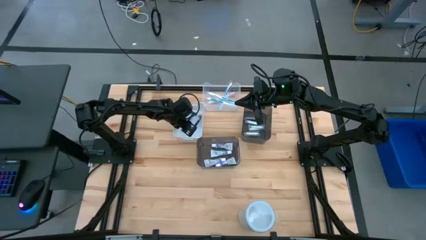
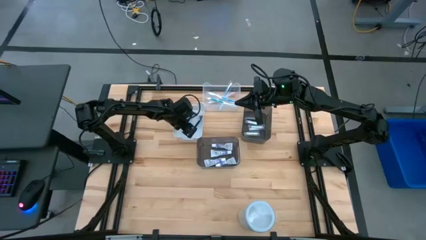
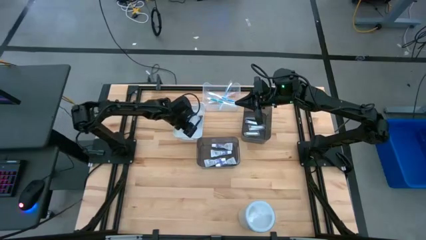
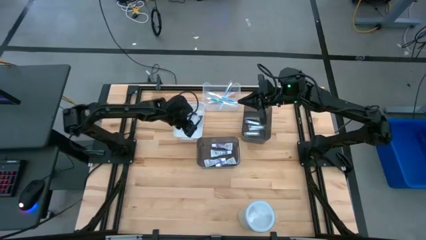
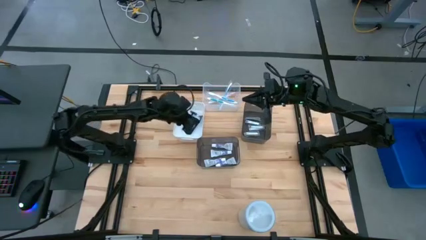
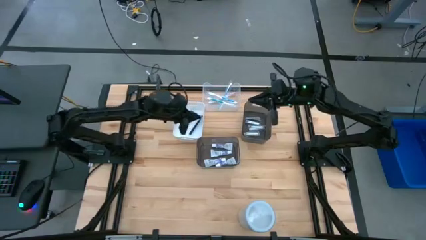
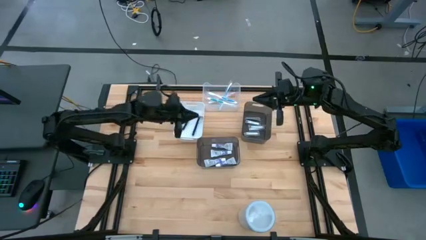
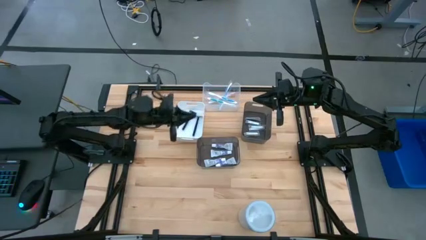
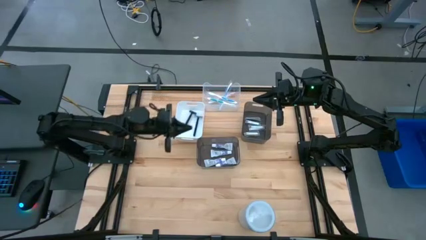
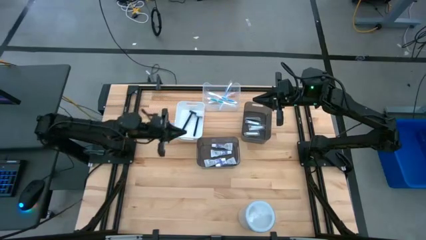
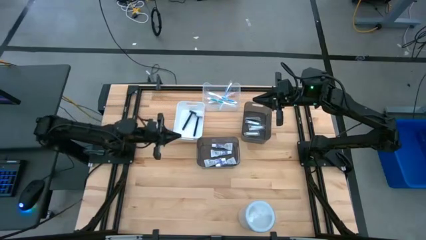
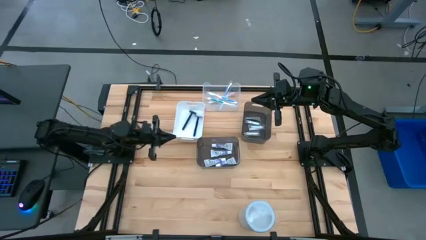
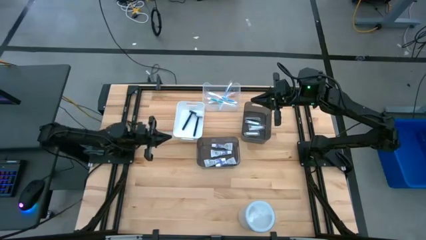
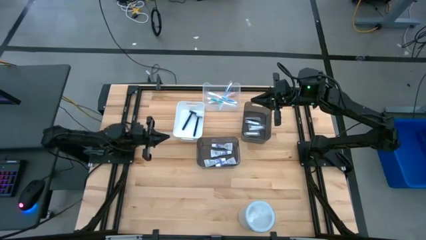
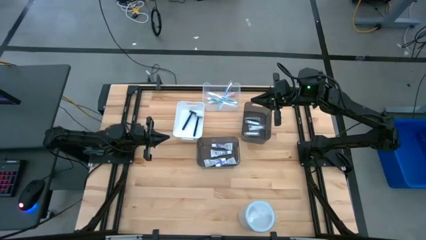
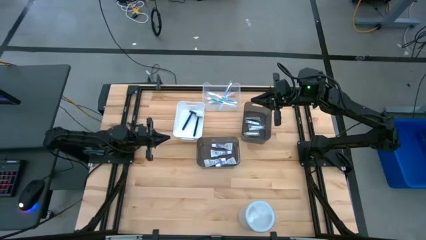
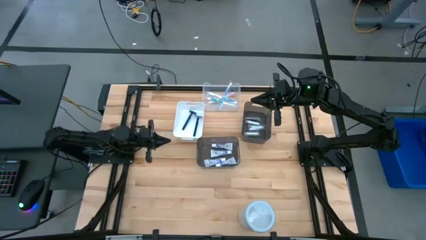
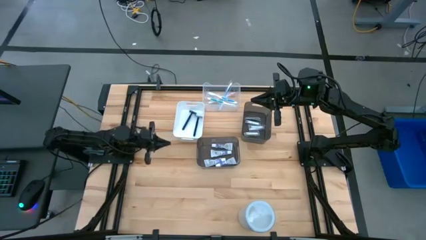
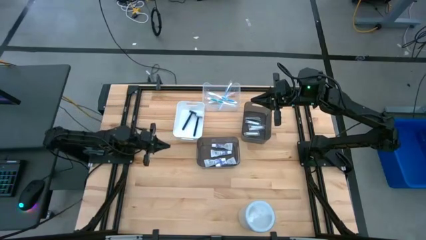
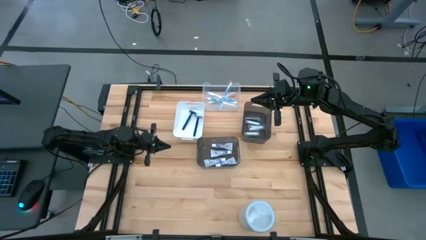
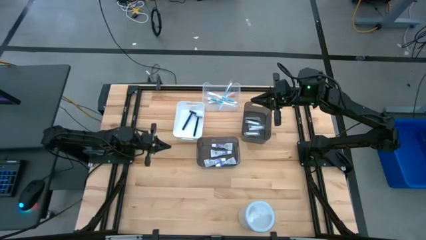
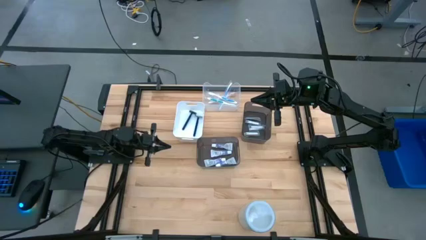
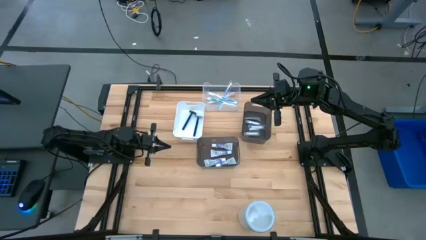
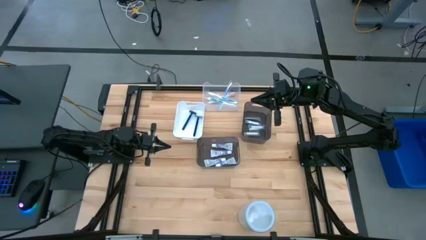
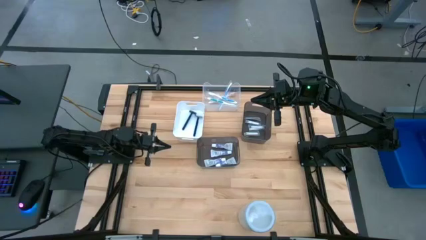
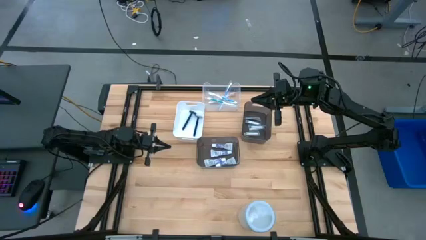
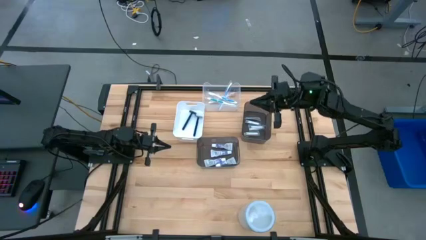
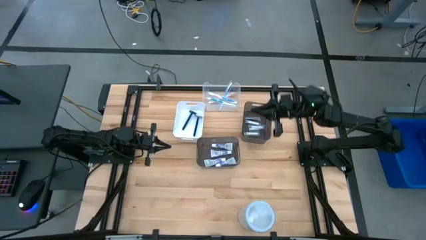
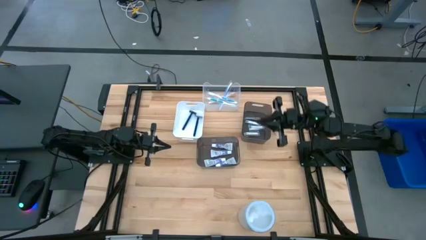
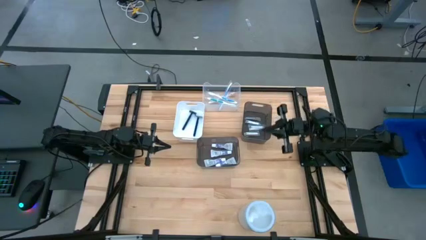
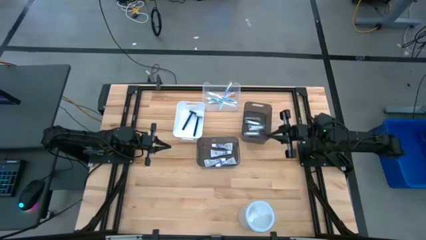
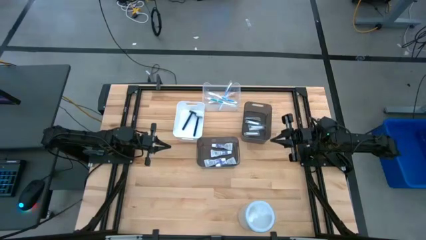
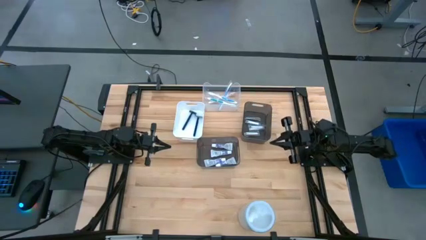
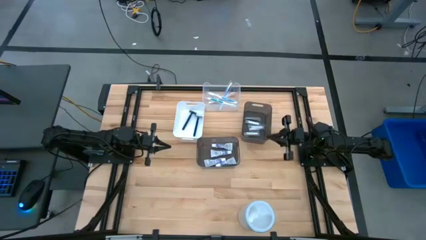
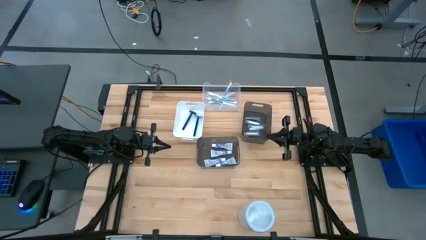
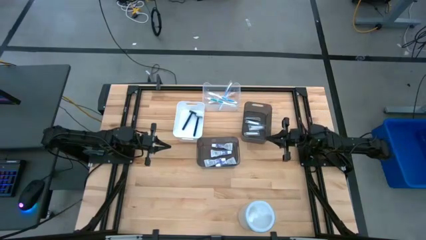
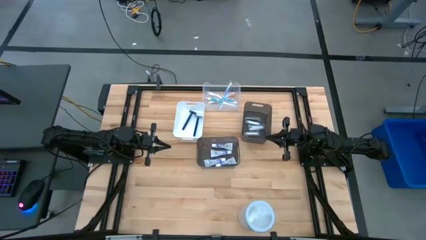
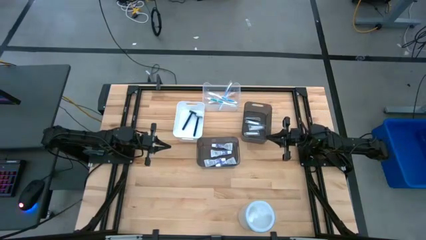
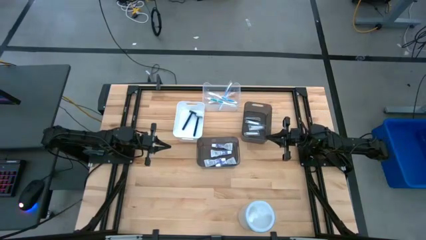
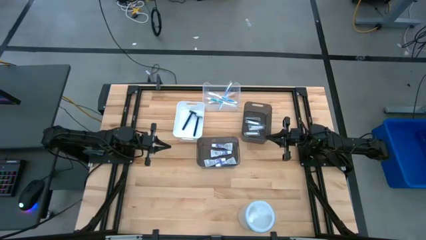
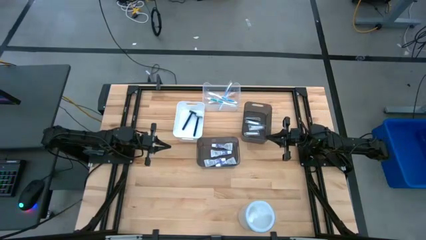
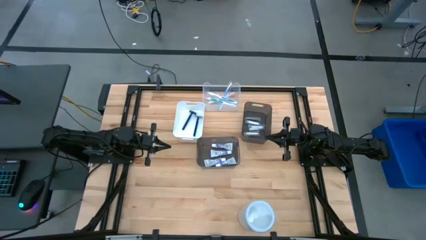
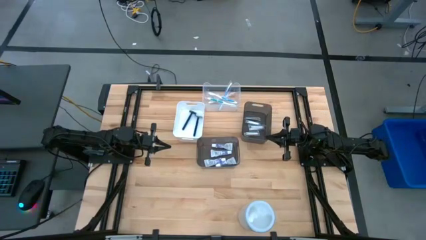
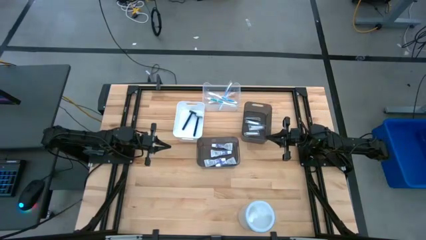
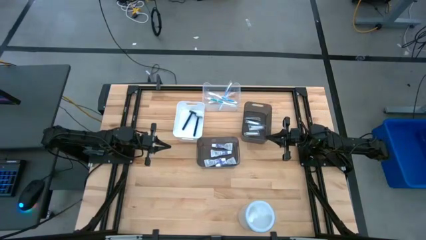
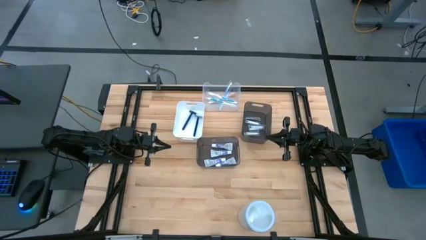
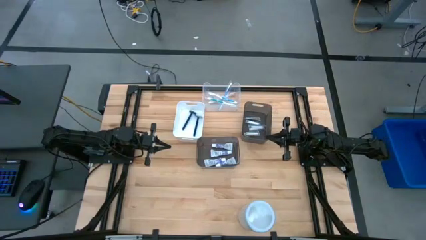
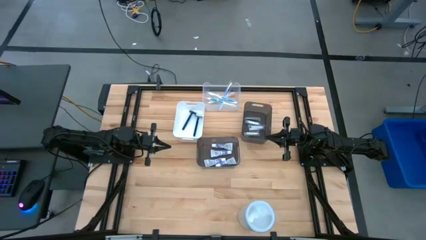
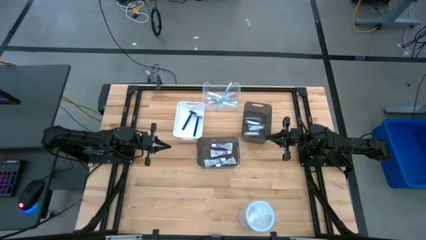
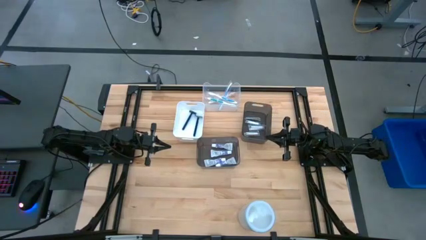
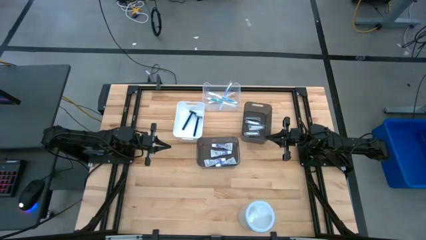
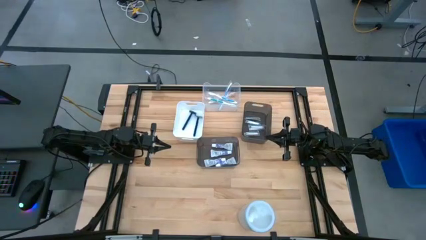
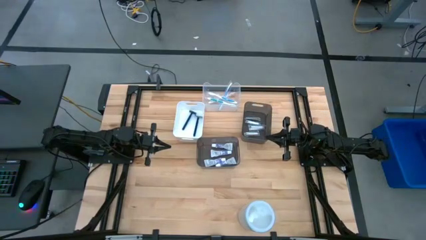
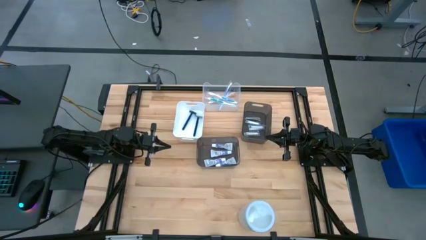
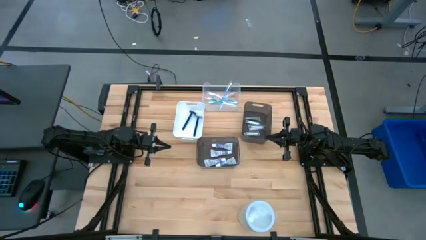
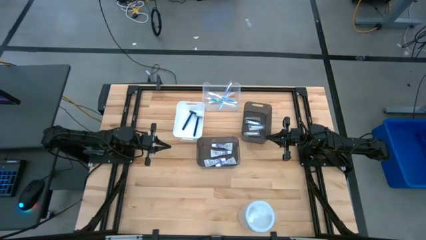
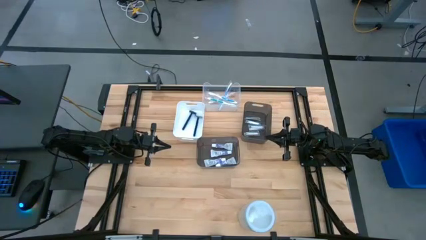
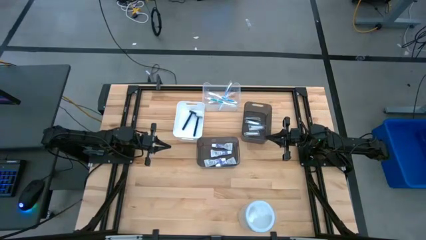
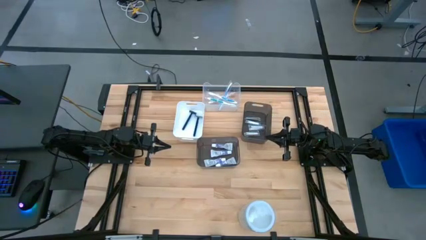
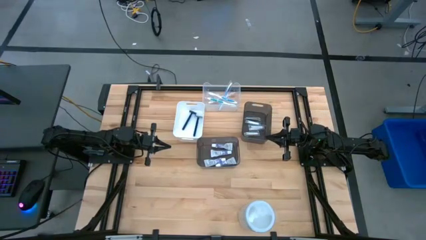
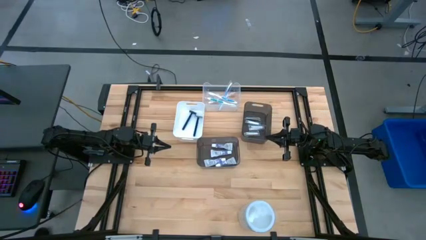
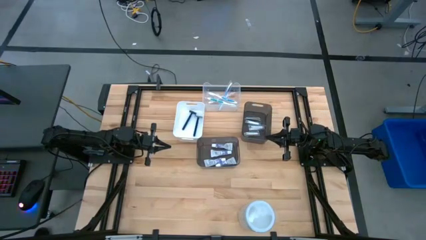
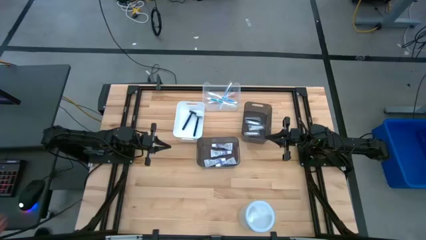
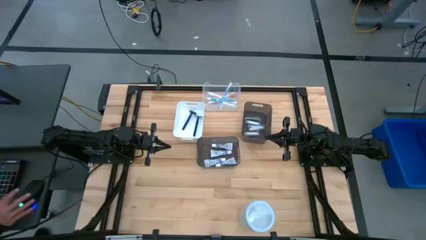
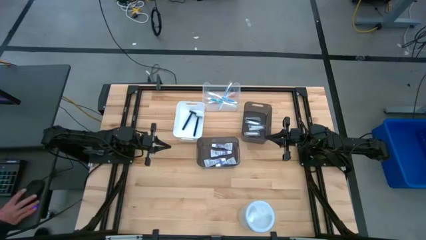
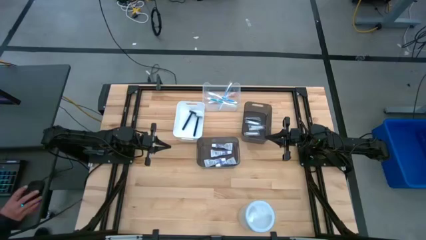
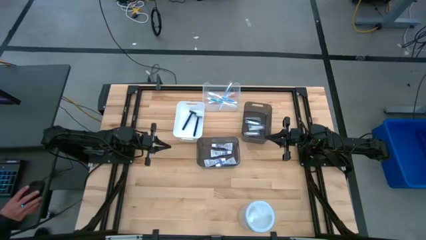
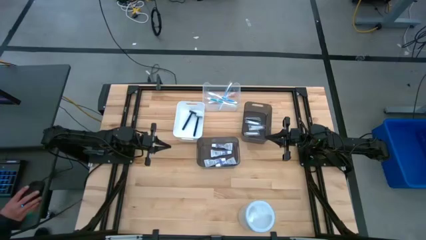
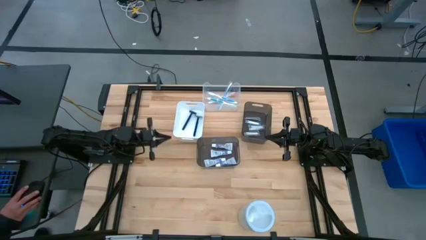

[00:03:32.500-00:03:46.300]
Task: Pick & Place Travel size toiletries
Return to Home Position
